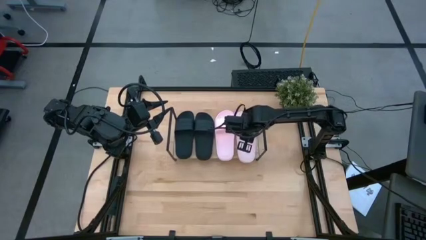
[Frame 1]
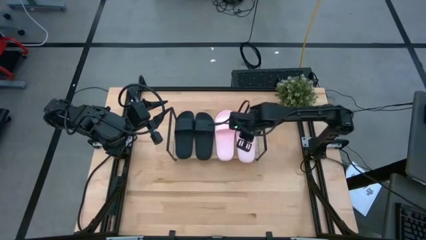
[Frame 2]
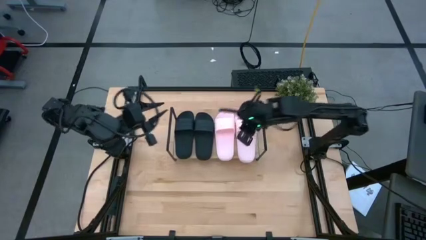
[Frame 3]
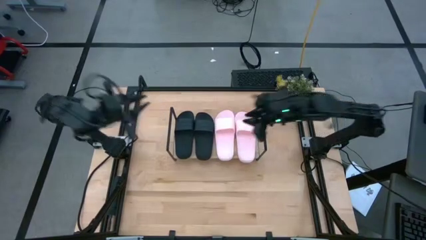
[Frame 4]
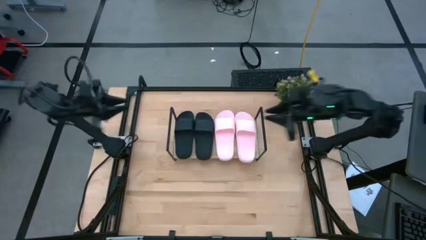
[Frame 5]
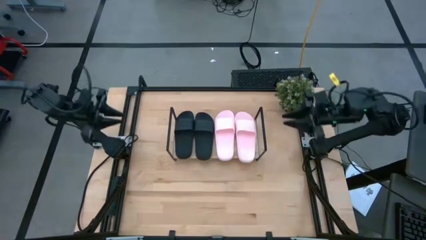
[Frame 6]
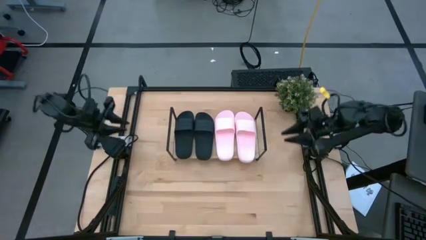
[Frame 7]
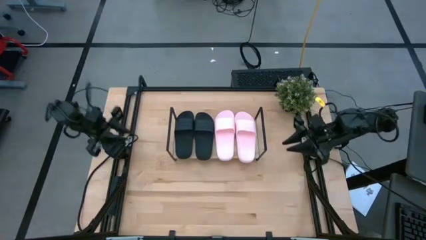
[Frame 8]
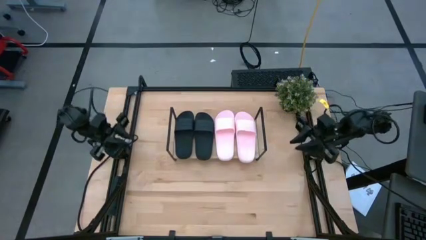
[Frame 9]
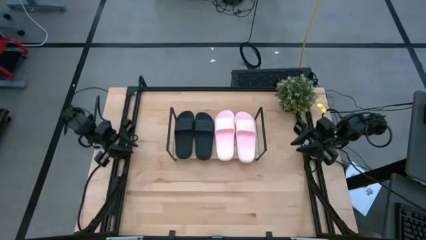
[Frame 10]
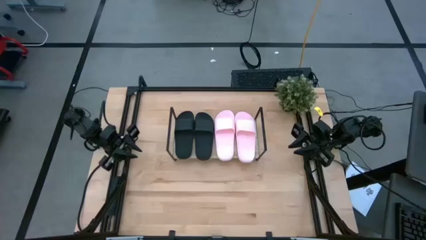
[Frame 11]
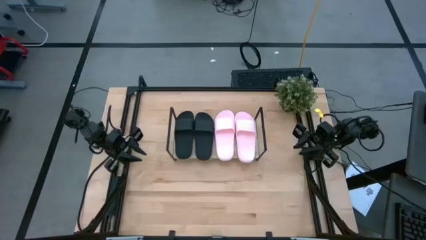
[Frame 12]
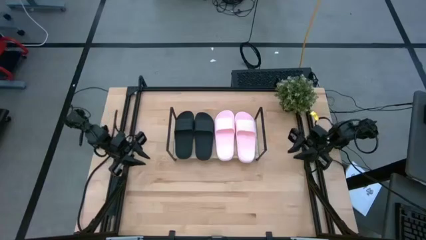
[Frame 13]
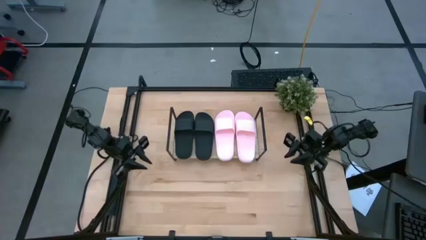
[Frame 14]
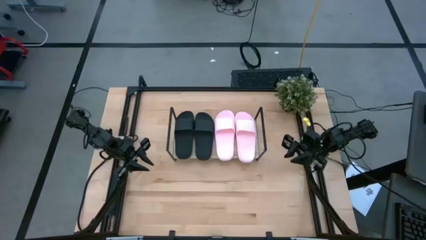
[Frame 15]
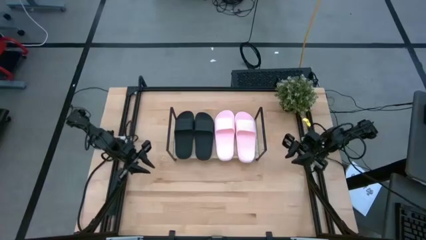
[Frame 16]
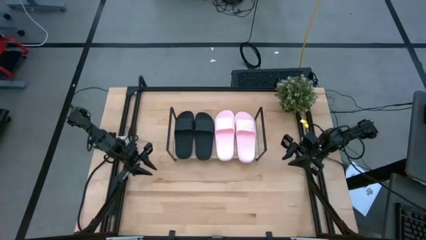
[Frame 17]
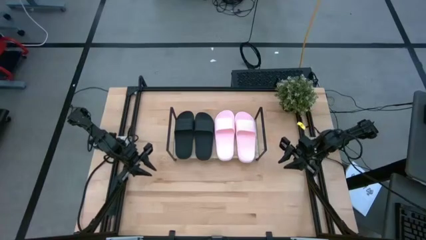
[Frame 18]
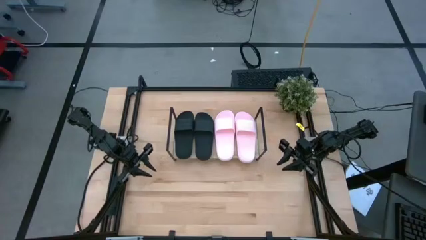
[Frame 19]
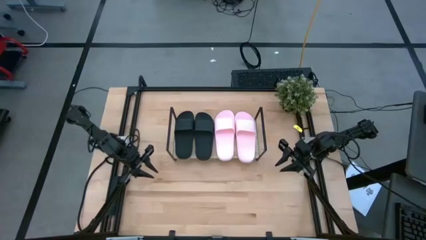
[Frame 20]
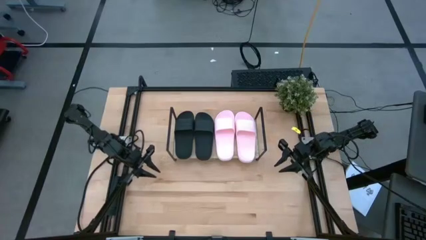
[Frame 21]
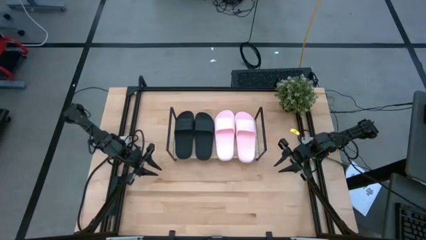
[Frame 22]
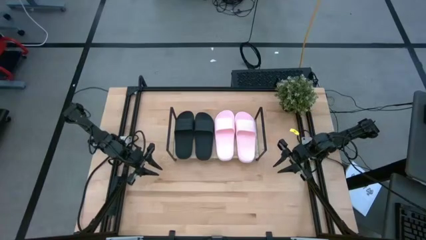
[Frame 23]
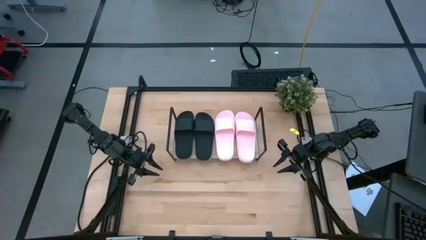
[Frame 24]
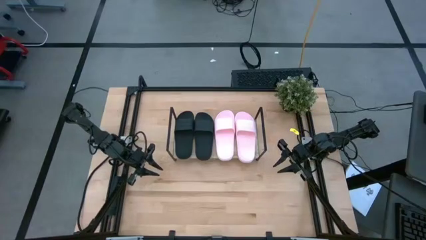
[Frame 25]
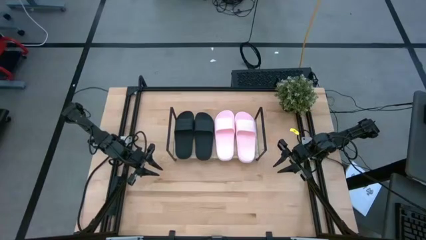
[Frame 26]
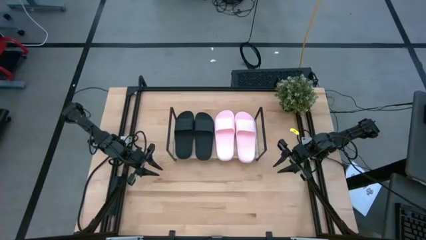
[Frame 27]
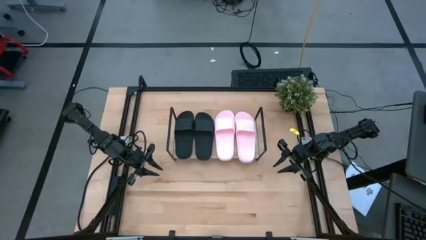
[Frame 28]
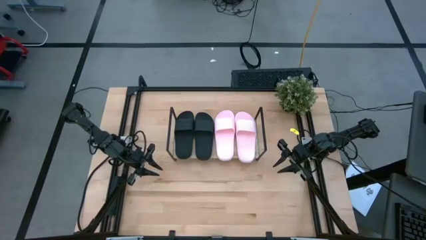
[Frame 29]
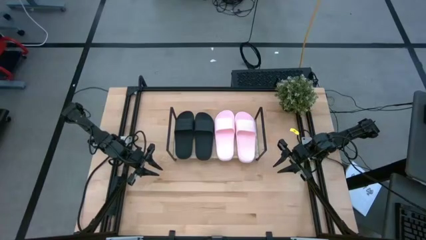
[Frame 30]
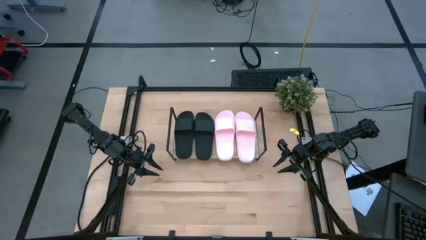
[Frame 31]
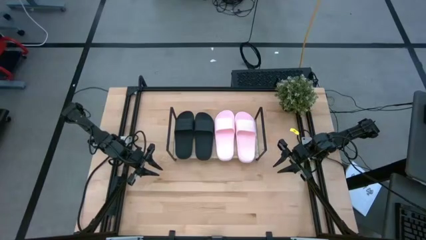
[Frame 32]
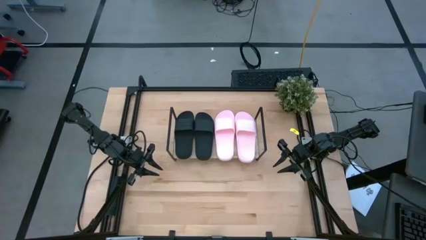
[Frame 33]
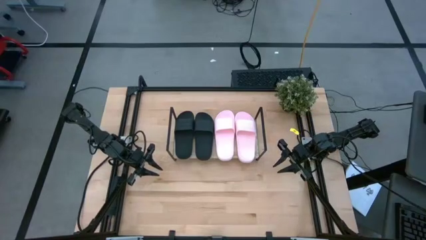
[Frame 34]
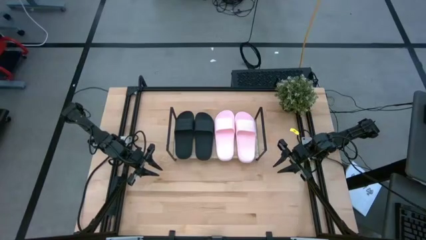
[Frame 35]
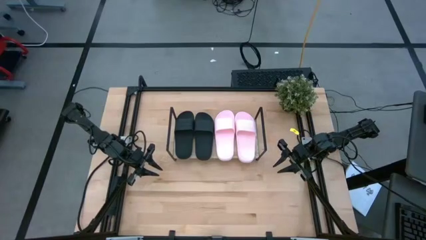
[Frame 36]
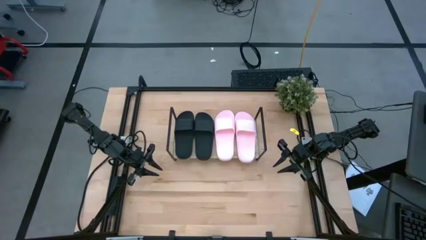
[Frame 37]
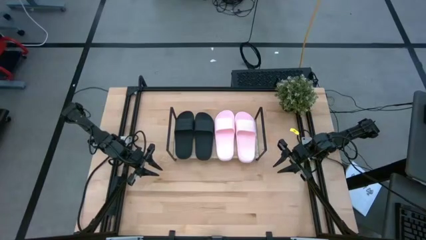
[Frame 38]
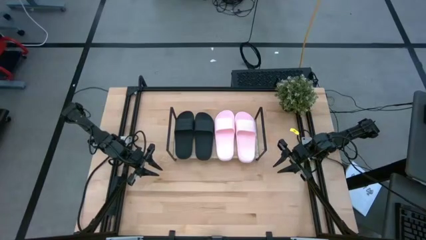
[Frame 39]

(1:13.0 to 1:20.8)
Task: Pick and place slides into the shelf
Return to Home Position

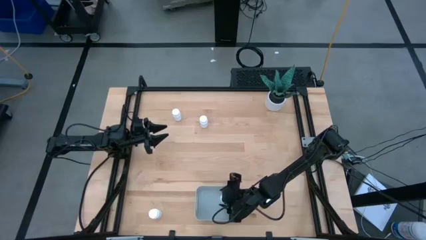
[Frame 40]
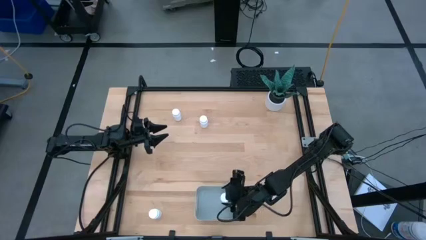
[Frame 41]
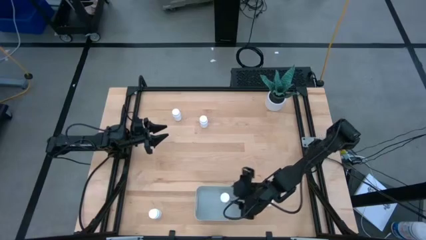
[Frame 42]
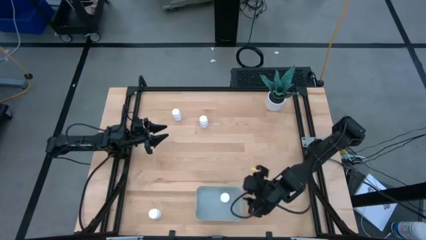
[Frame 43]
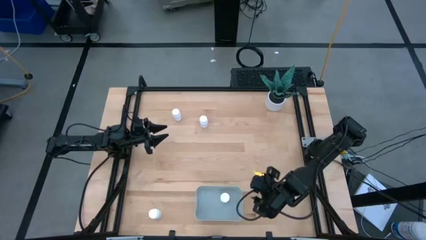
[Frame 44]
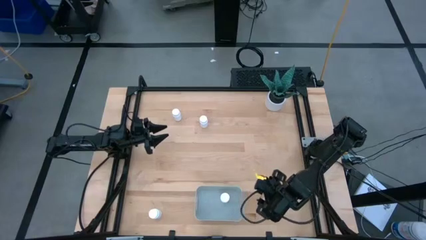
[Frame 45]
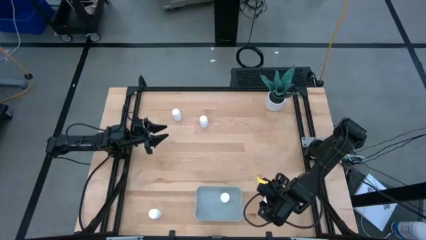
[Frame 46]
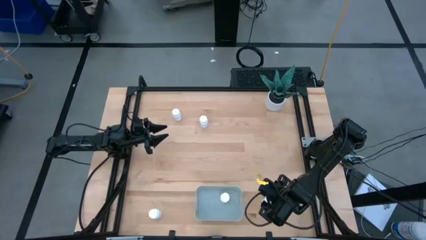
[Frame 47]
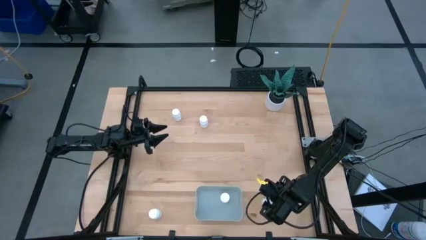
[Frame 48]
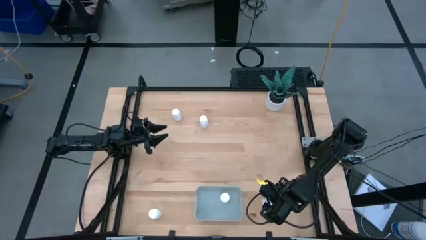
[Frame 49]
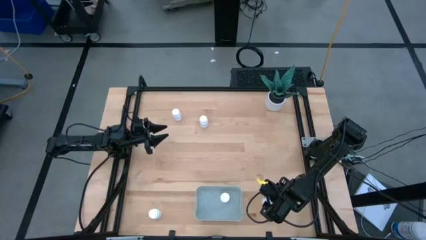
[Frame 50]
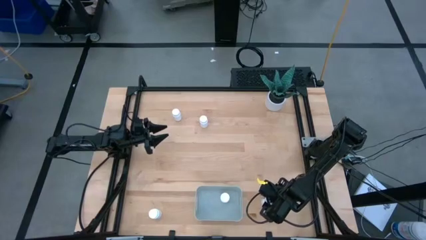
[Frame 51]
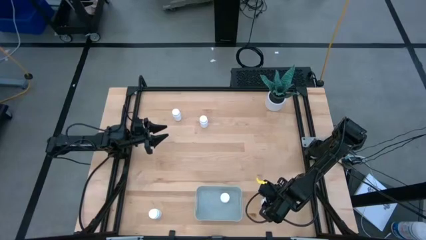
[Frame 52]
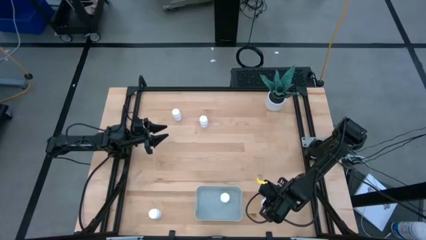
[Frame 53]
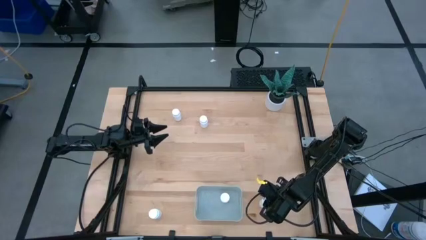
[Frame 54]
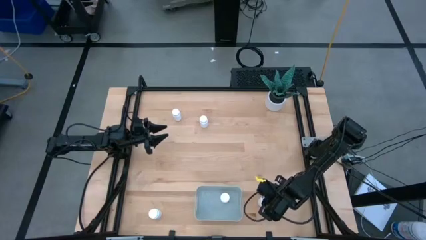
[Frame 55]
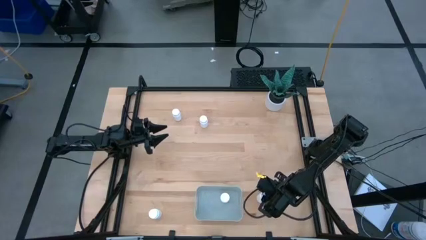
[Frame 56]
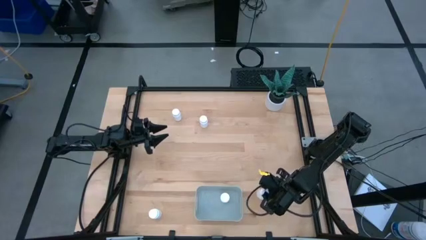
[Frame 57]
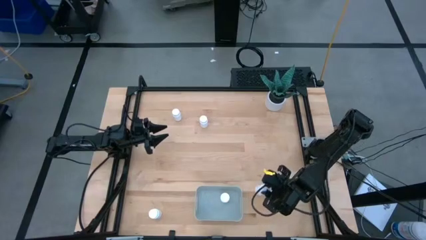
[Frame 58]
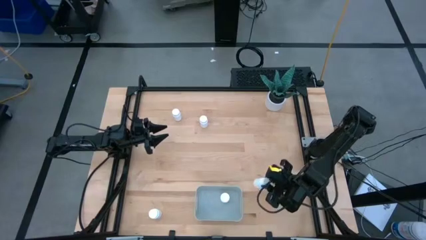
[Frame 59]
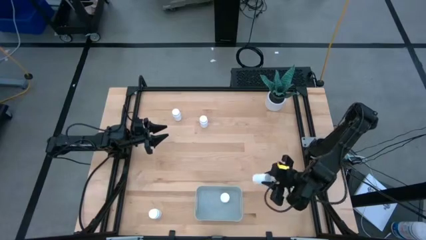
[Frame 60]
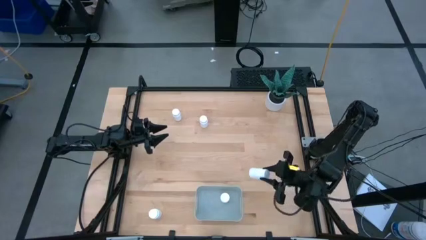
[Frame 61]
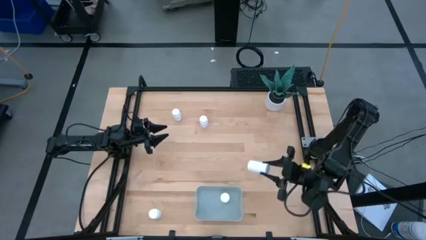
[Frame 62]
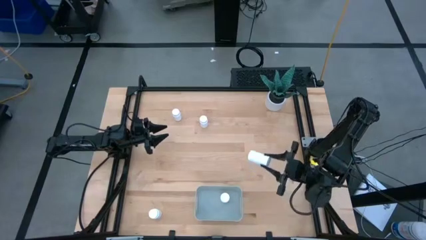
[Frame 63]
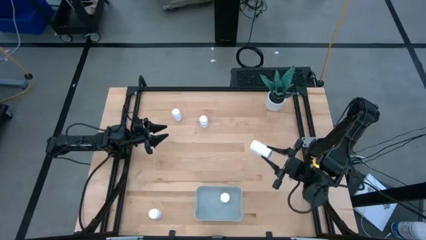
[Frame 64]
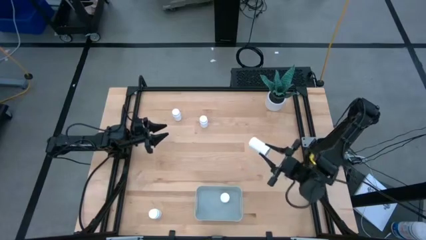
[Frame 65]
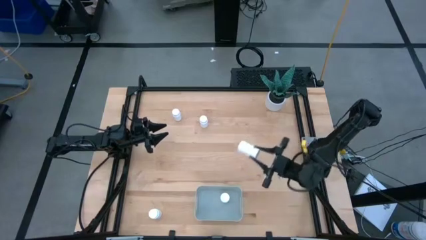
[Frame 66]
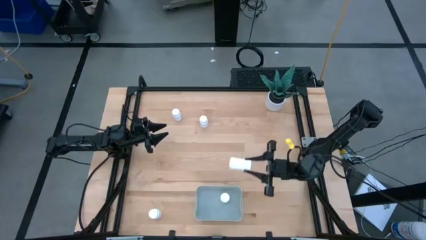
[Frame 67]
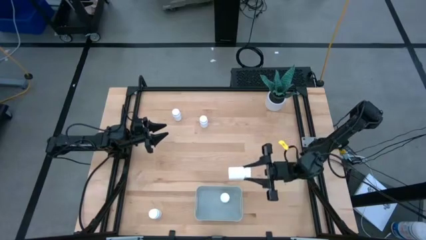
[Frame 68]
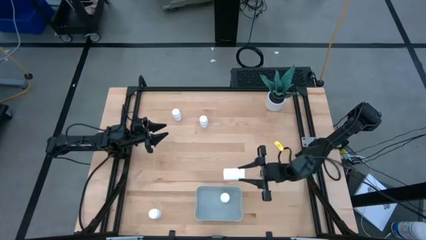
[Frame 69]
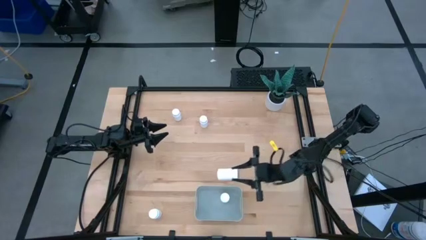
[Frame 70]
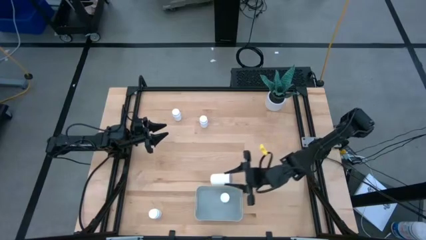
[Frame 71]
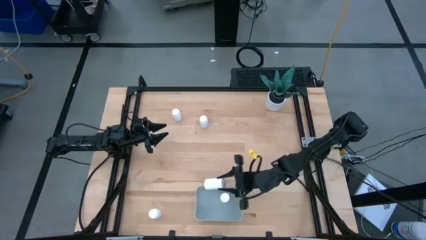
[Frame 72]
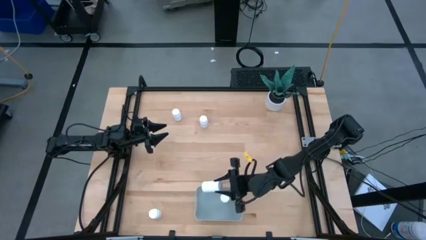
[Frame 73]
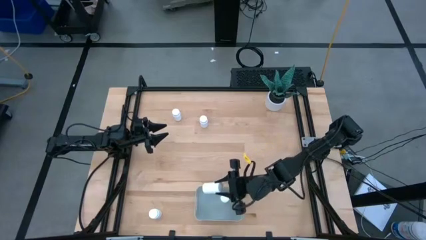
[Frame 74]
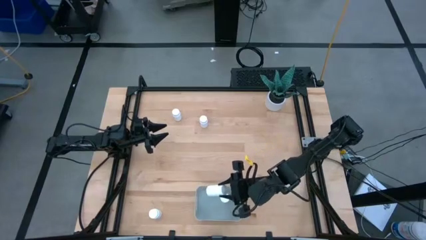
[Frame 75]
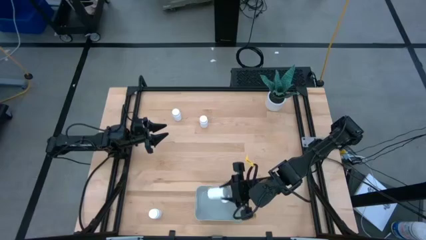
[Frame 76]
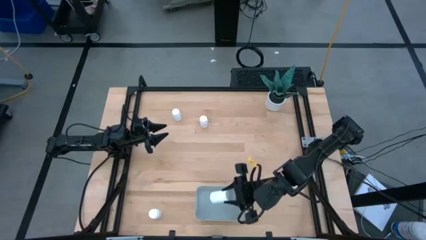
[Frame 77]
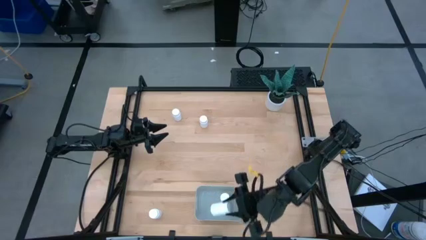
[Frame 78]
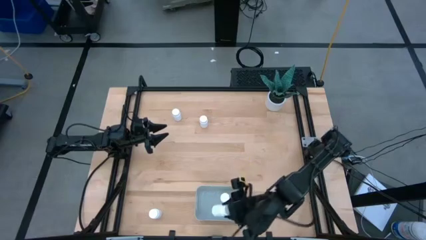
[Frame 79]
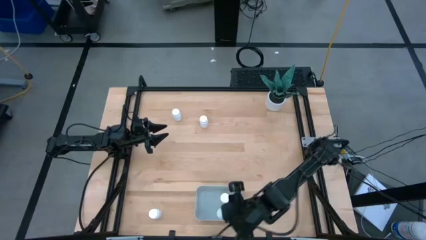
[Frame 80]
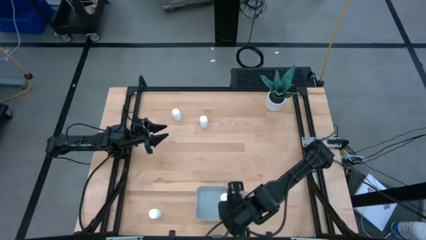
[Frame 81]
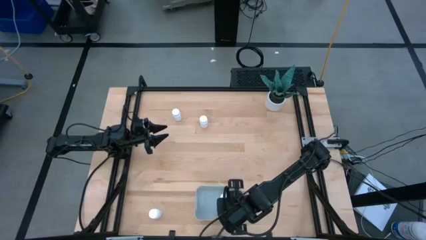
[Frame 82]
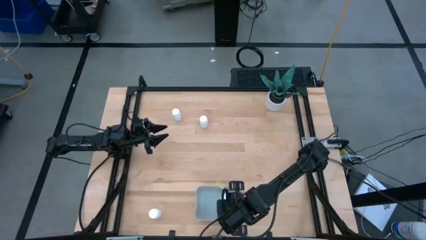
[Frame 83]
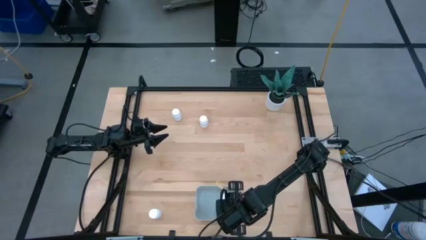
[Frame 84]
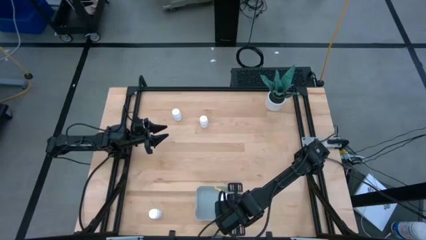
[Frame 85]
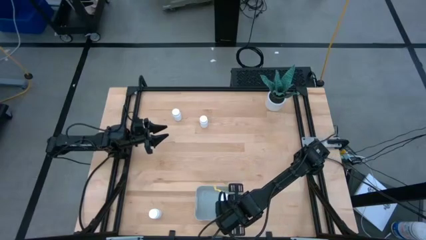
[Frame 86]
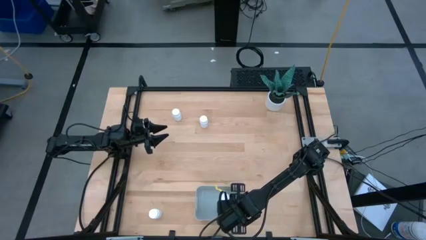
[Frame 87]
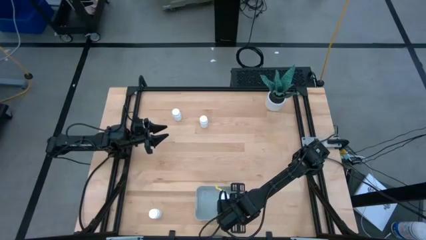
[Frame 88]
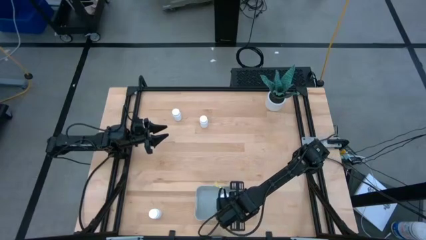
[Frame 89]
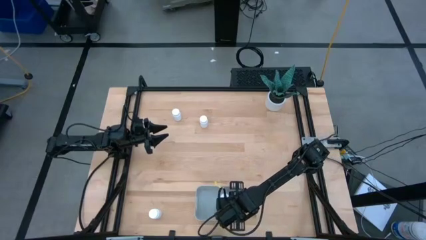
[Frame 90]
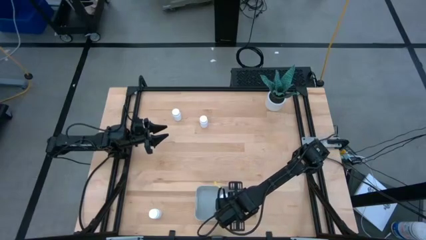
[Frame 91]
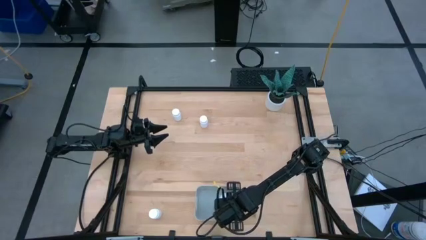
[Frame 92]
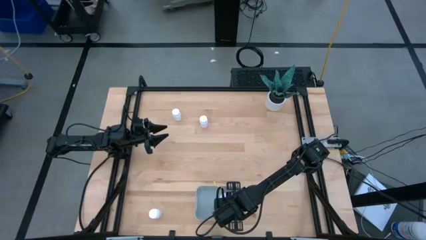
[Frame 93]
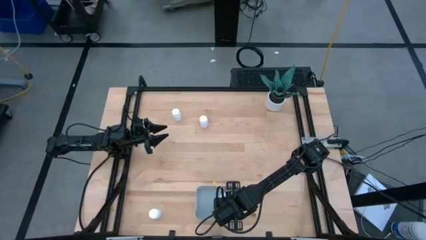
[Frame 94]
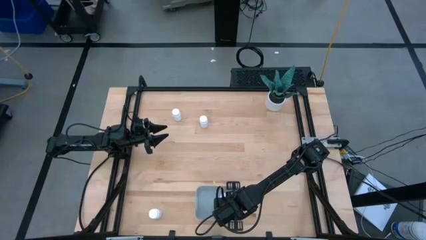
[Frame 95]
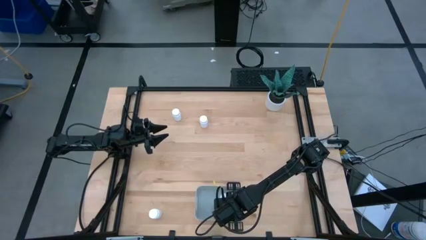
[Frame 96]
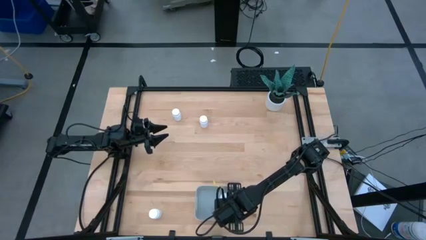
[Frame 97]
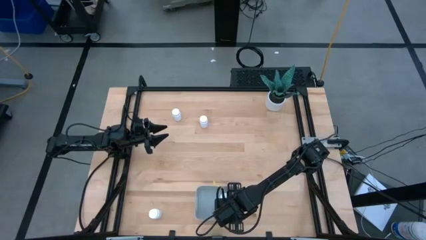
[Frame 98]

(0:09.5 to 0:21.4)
Task: Pick and place pill bottles into a basket
Put the white pill bottle into the gray bin
